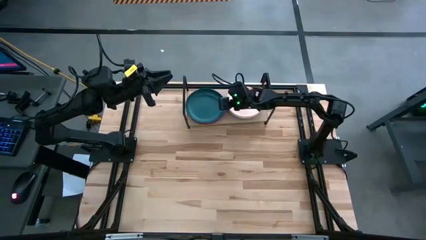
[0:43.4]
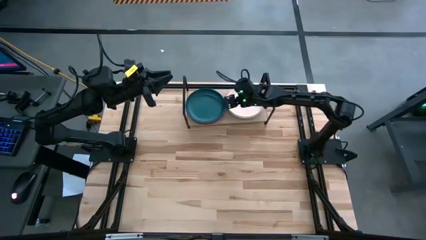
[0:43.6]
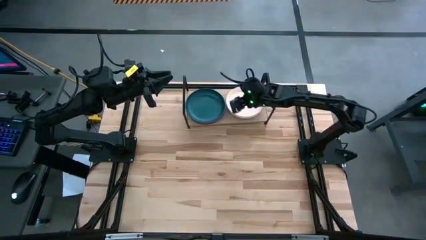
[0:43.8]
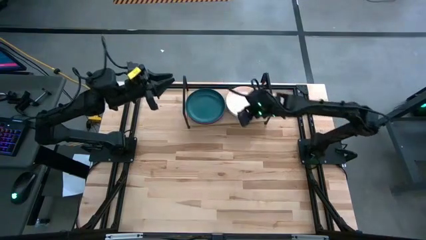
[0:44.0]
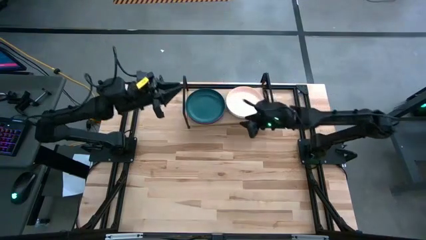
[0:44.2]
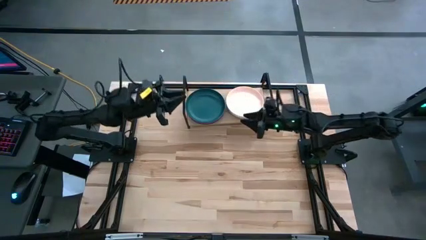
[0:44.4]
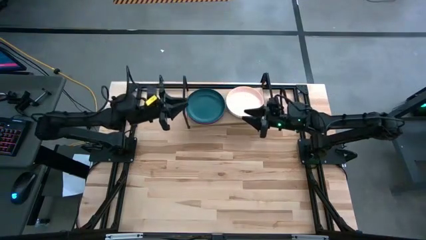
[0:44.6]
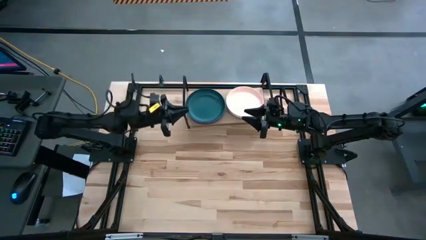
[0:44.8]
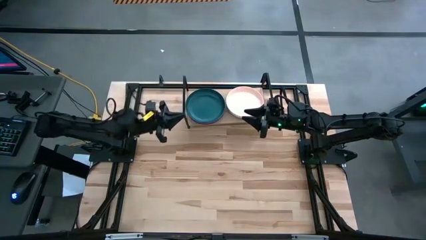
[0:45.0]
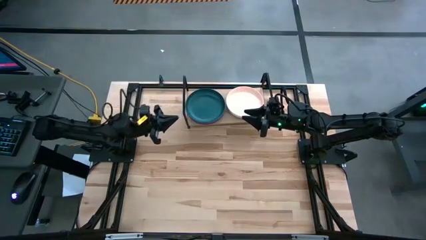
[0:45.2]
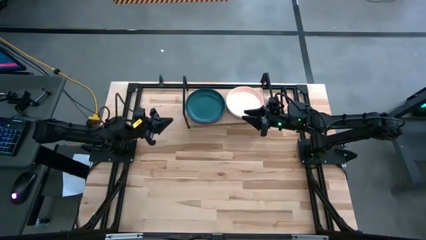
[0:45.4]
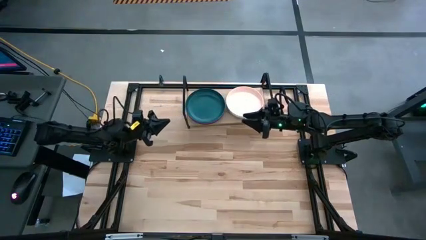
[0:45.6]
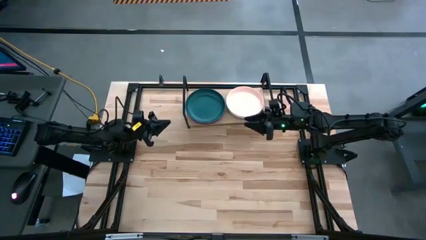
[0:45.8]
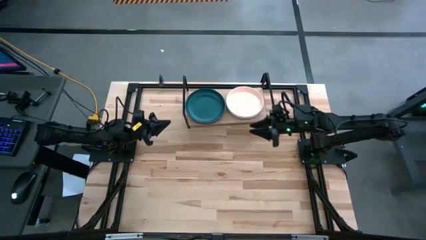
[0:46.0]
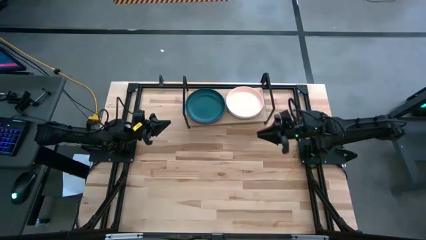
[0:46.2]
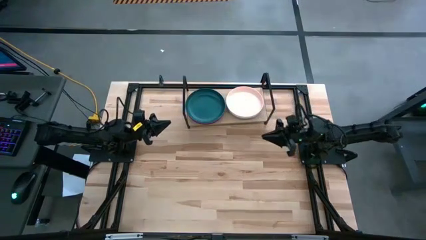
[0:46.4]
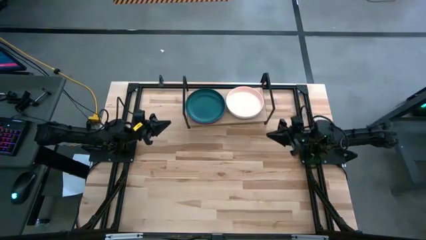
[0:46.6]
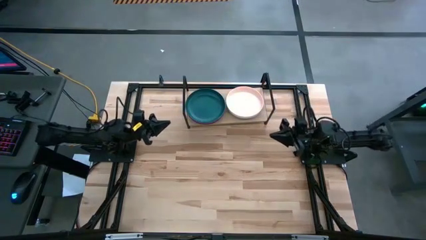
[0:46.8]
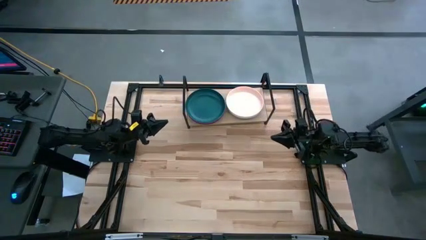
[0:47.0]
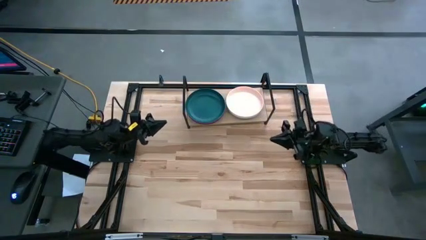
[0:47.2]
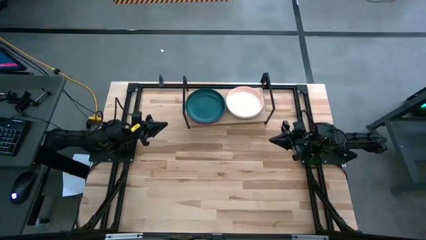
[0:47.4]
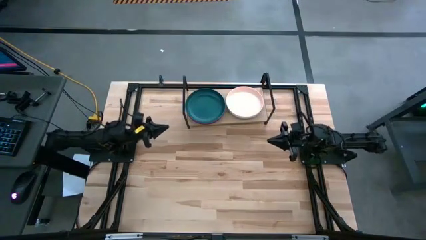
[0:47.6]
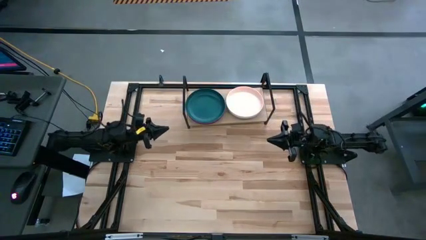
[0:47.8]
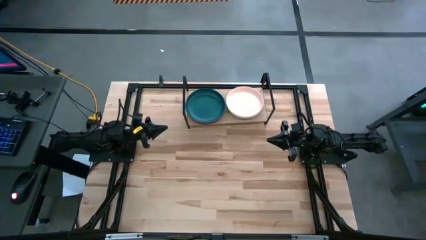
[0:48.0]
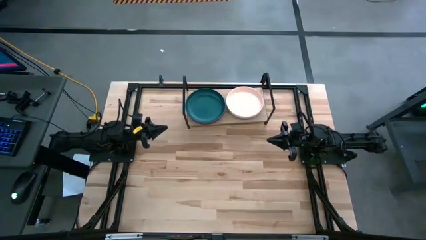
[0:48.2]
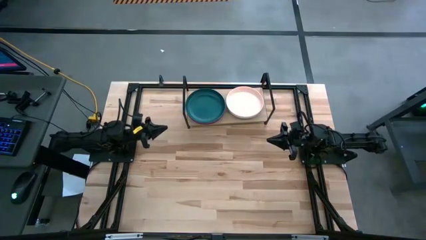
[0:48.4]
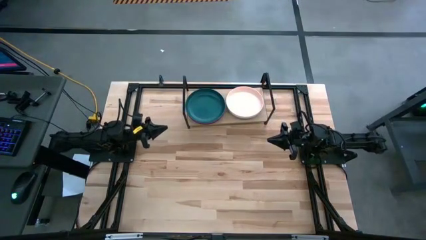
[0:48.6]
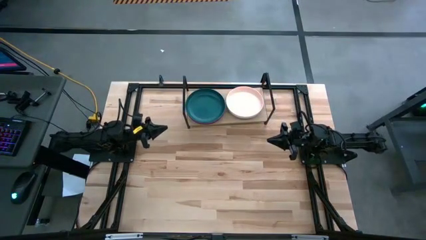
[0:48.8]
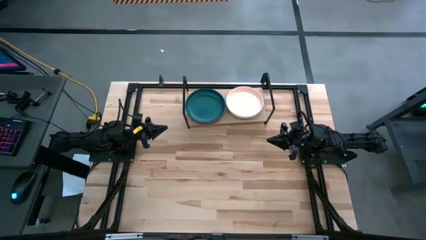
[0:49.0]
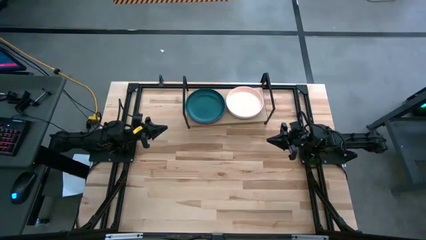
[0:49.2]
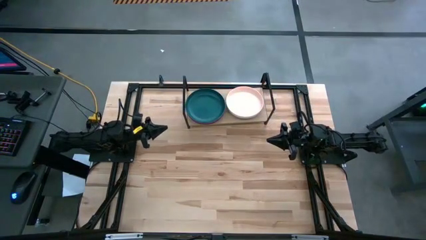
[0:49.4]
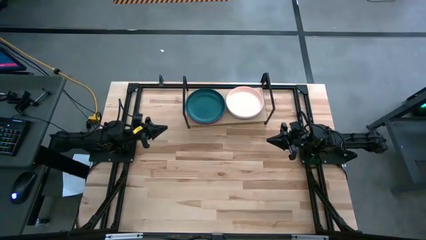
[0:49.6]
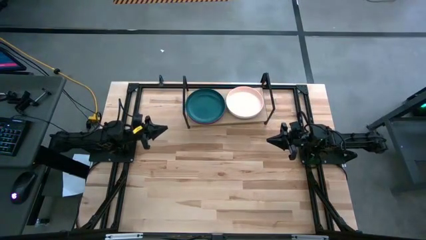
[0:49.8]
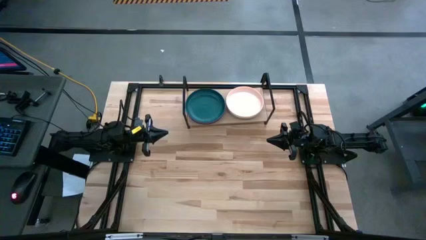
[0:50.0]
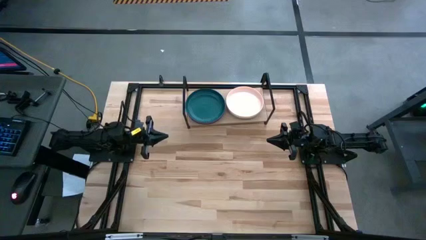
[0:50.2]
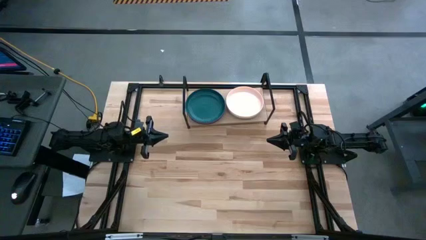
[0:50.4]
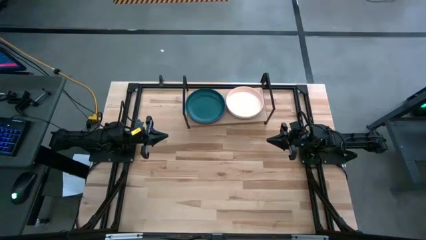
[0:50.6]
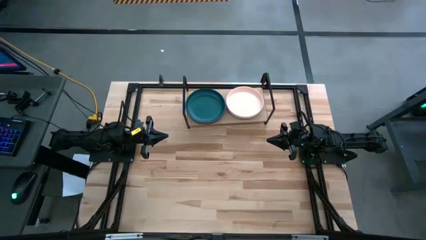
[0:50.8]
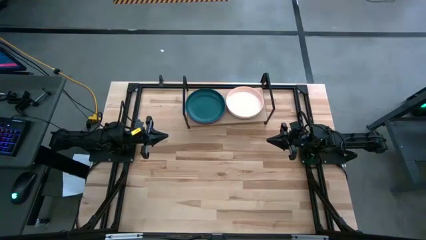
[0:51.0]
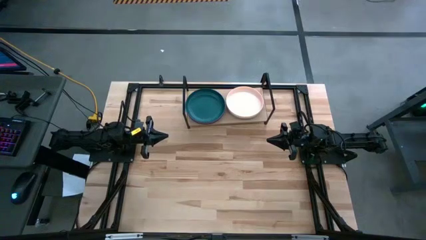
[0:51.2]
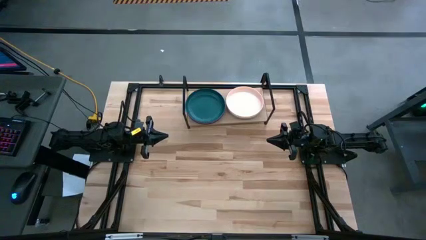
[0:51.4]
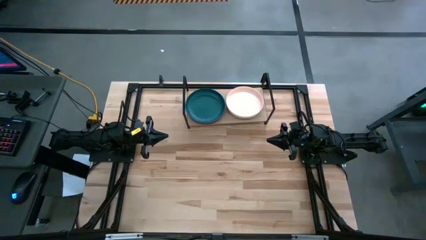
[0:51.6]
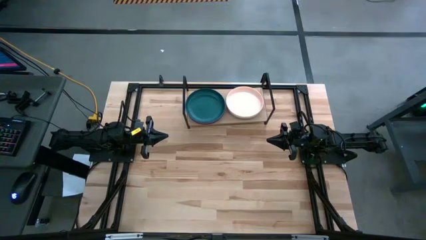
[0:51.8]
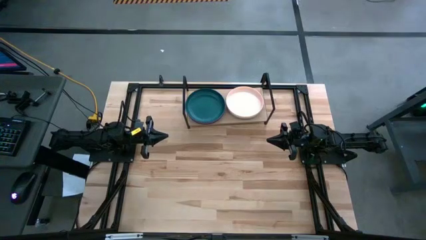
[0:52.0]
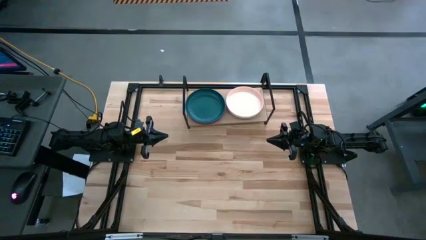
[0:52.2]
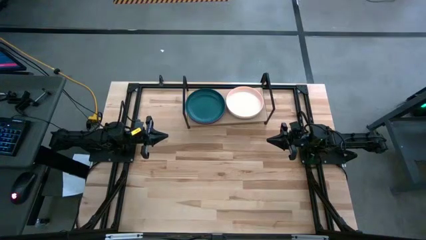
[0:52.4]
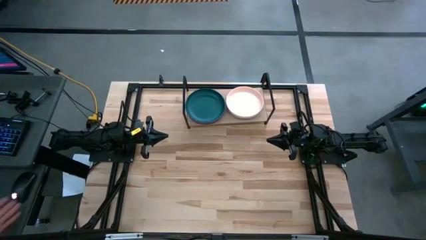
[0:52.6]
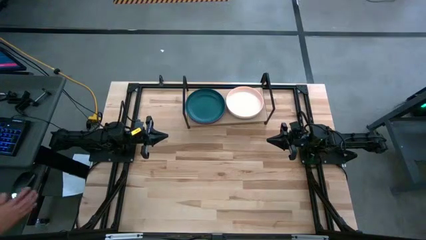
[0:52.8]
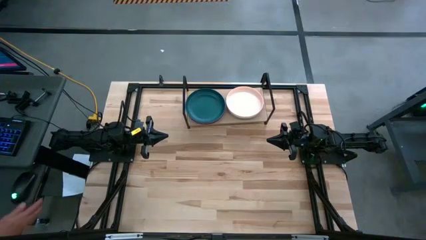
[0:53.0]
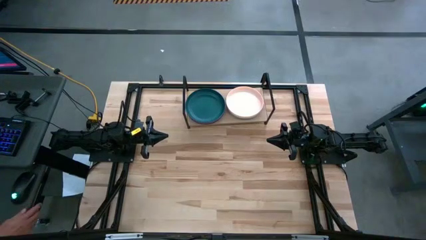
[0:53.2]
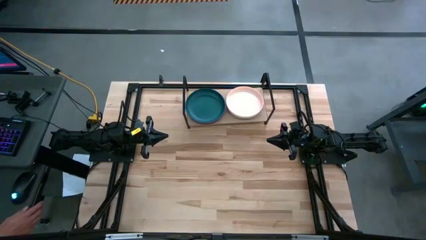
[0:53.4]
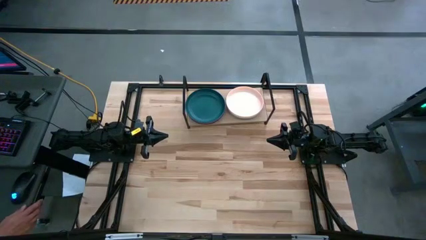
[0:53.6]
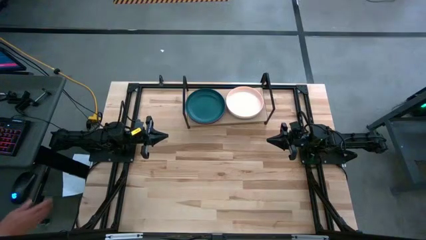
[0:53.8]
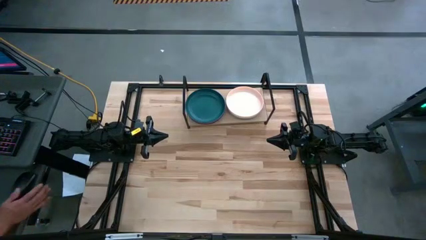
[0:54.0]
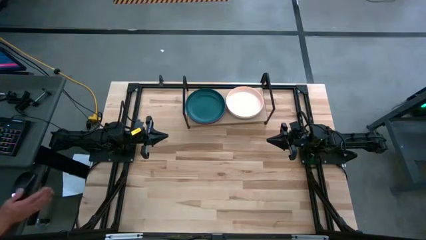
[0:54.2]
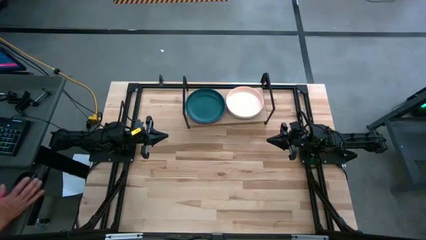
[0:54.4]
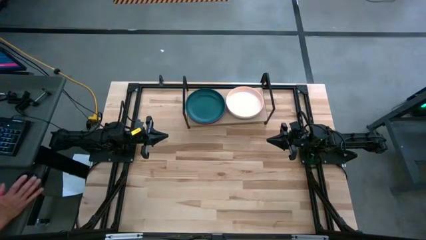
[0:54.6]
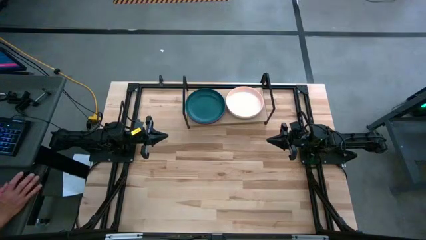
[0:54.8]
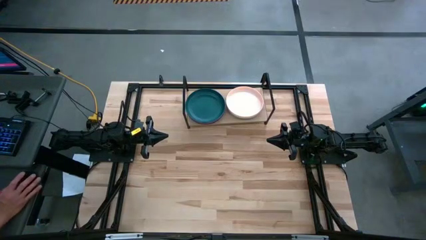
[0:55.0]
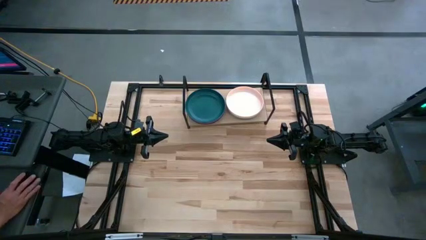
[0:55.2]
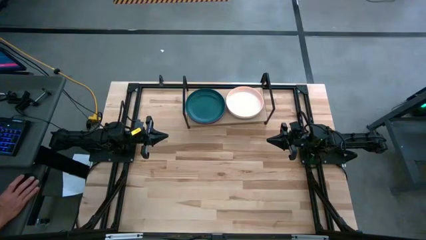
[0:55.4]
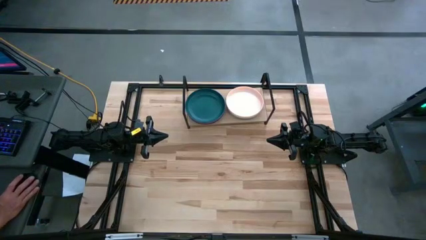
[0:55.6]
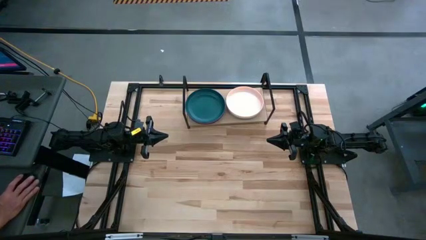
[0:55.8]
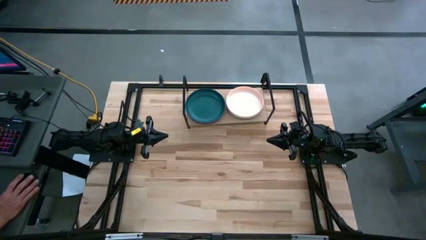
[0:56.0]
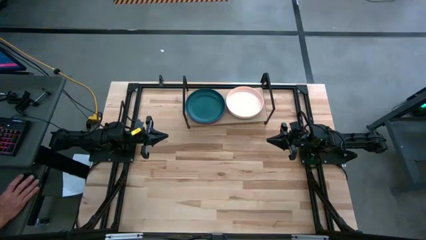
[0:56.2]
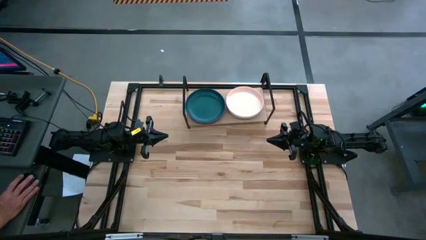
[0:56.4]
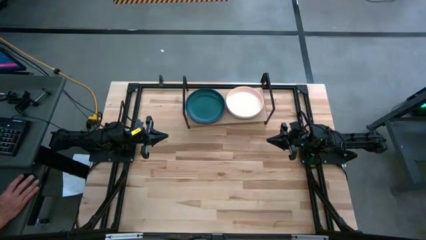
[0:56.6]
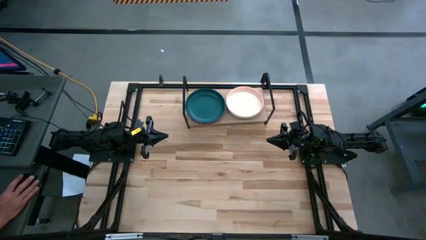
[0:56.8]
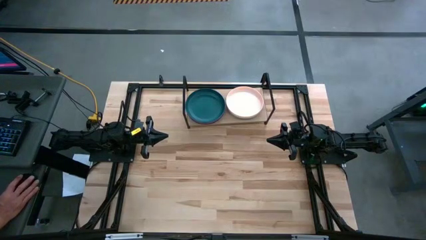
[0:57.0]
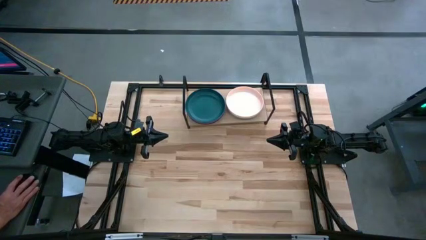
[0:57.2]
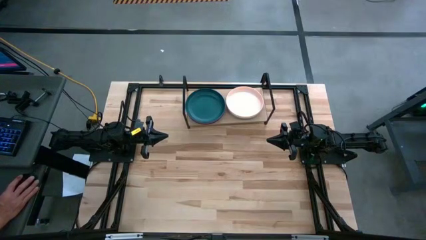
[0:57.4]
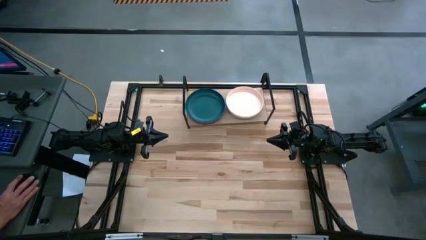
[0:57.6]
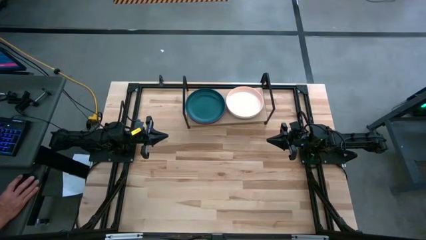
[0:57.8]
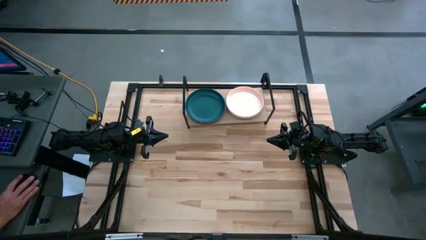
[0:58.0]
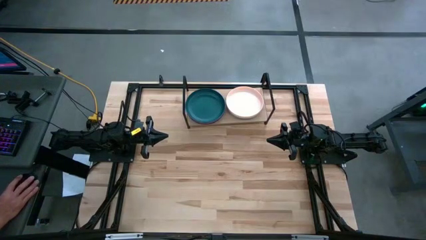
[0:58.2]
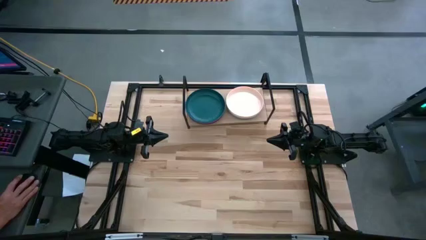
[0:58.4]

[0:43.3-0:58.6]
Task: Place and stack plates onto a shelf
Return to Home Position
